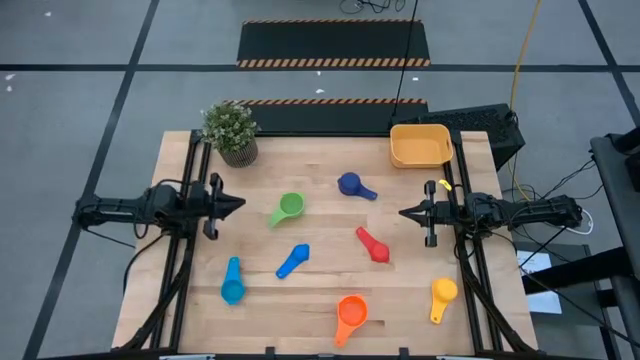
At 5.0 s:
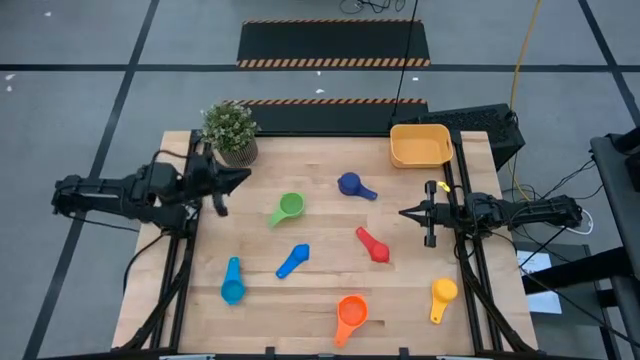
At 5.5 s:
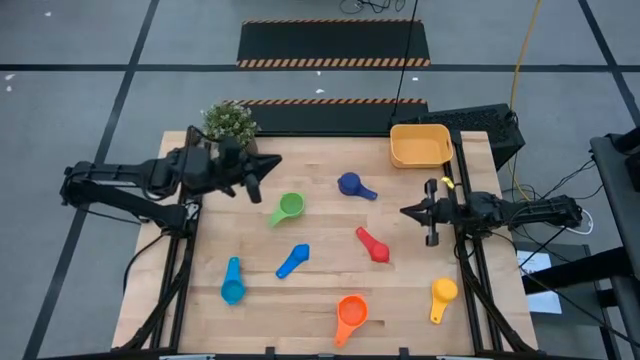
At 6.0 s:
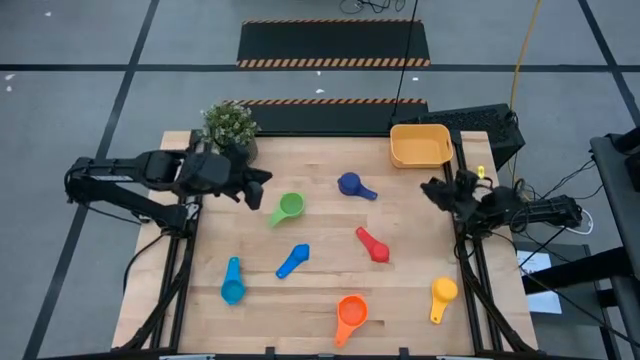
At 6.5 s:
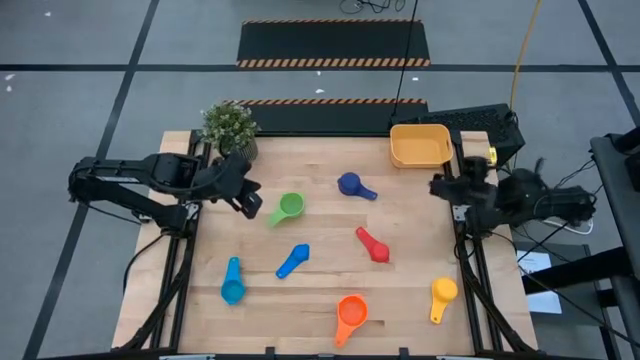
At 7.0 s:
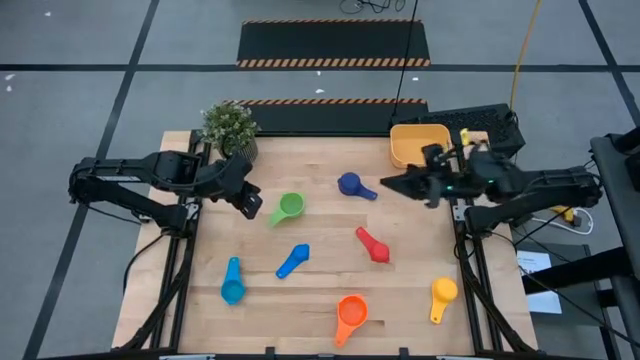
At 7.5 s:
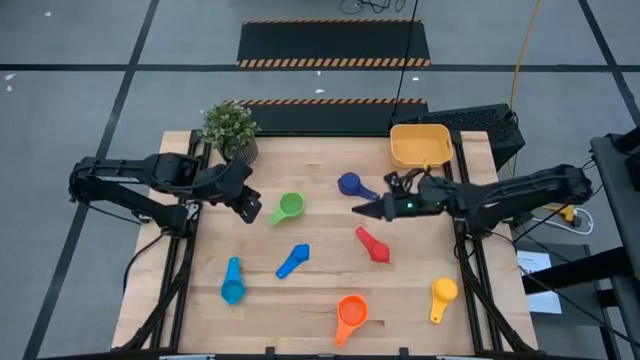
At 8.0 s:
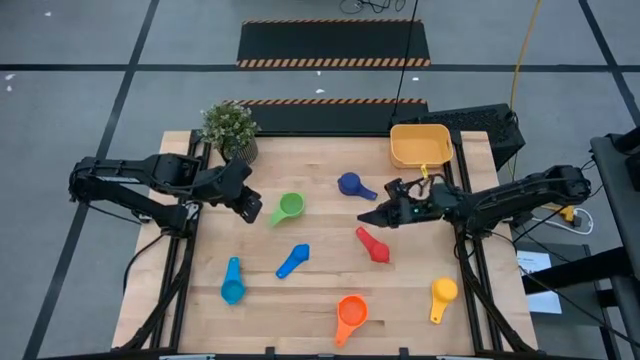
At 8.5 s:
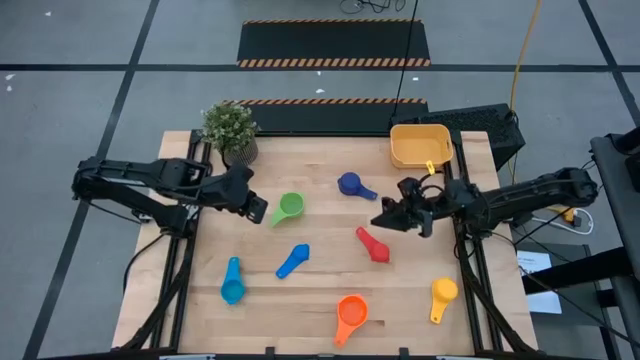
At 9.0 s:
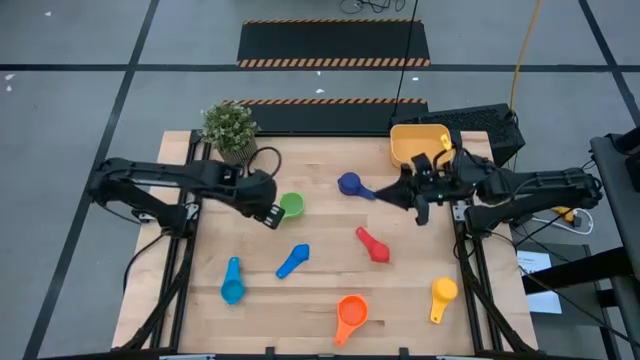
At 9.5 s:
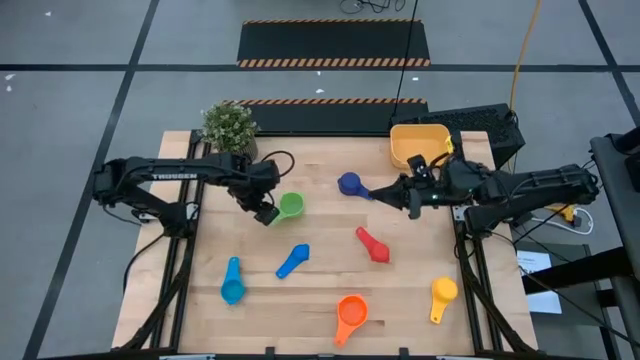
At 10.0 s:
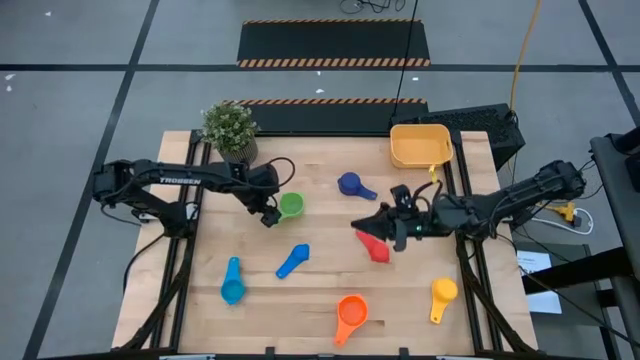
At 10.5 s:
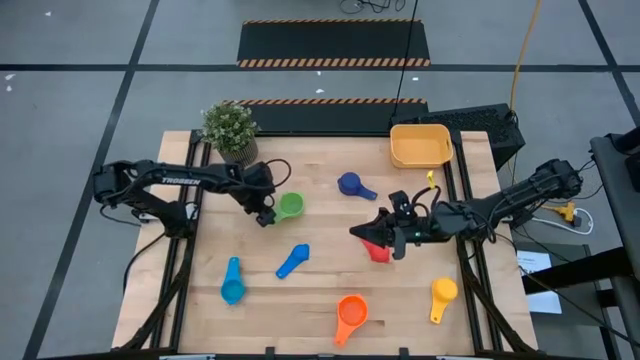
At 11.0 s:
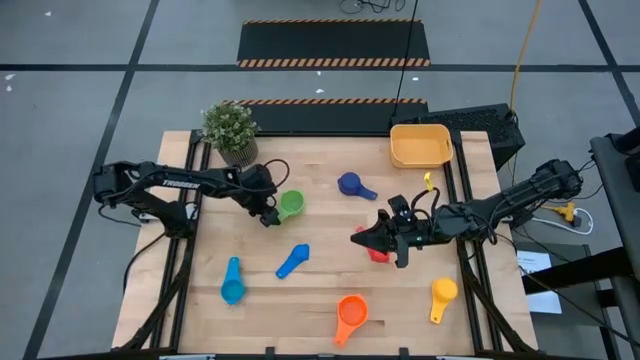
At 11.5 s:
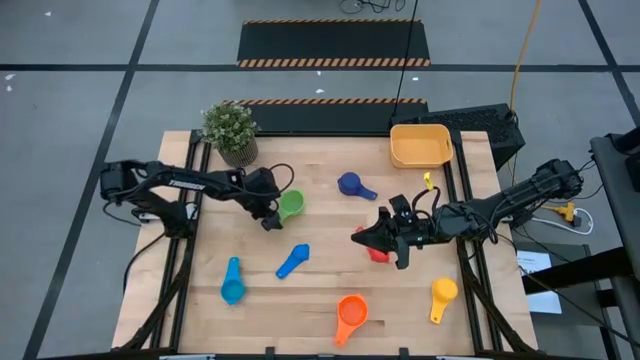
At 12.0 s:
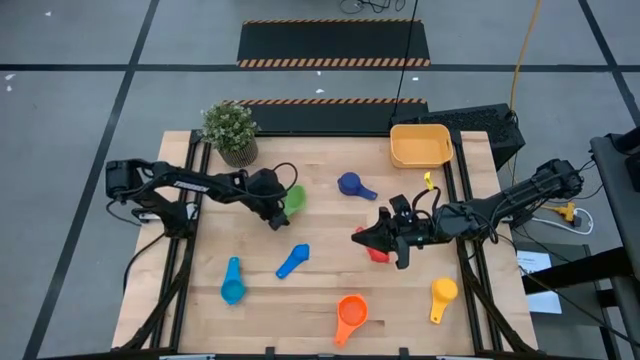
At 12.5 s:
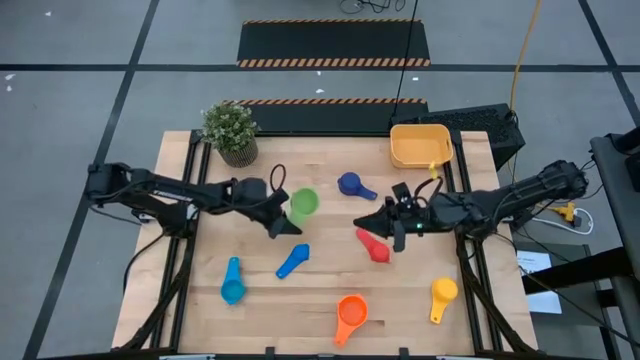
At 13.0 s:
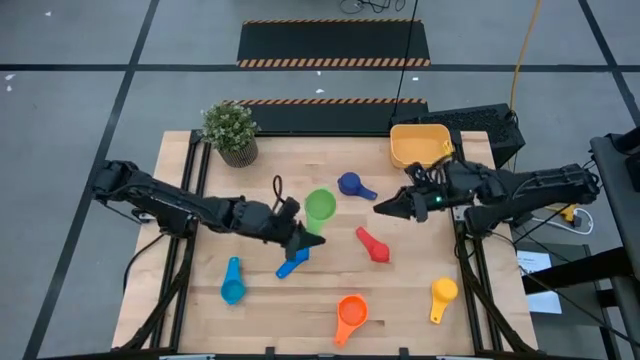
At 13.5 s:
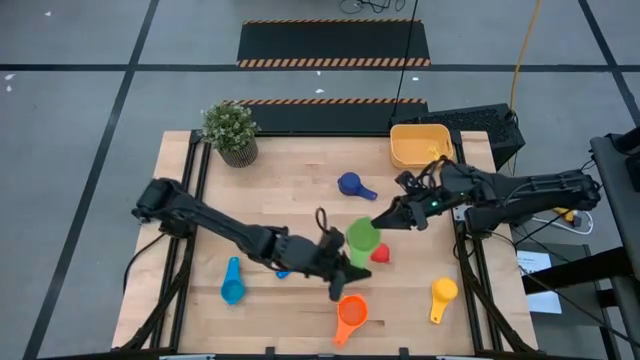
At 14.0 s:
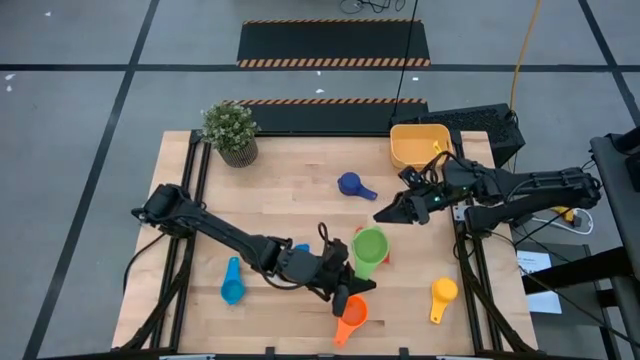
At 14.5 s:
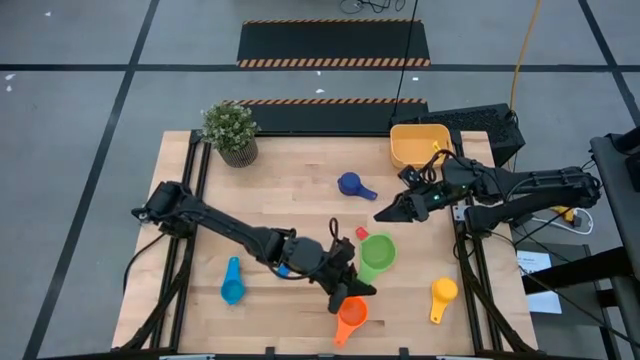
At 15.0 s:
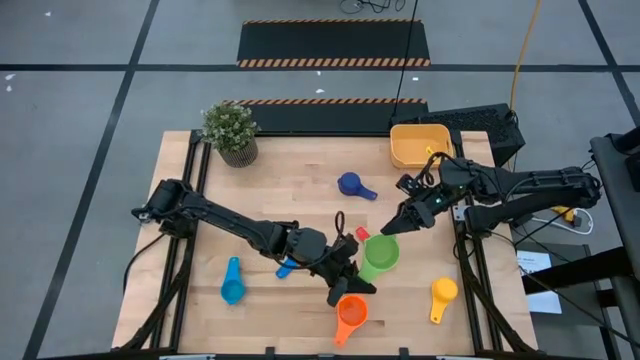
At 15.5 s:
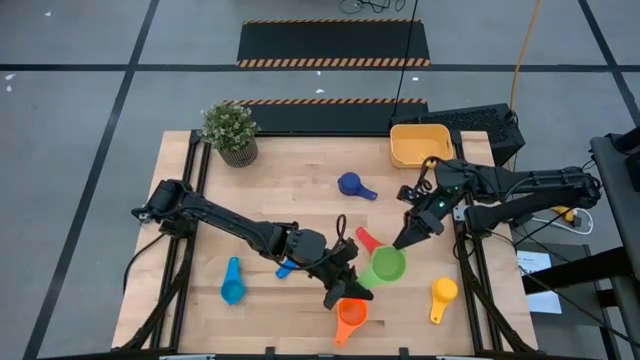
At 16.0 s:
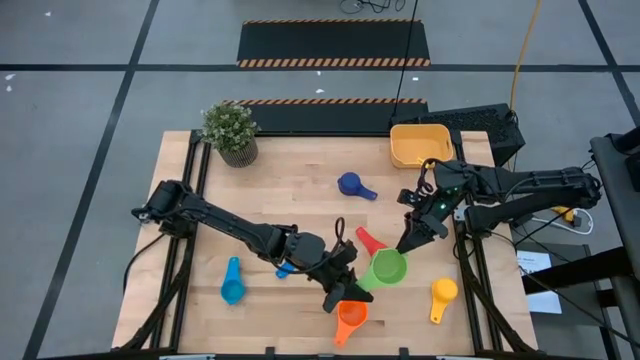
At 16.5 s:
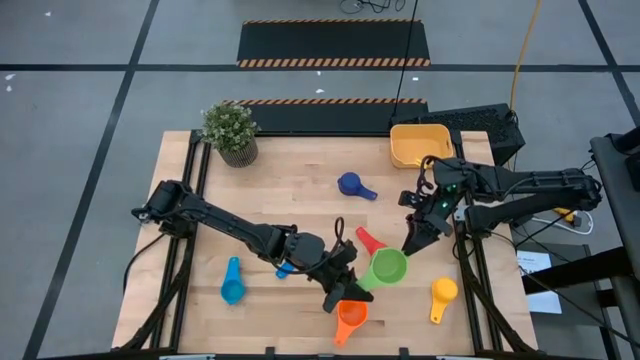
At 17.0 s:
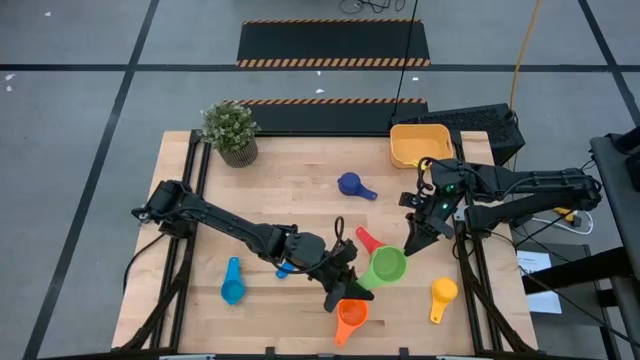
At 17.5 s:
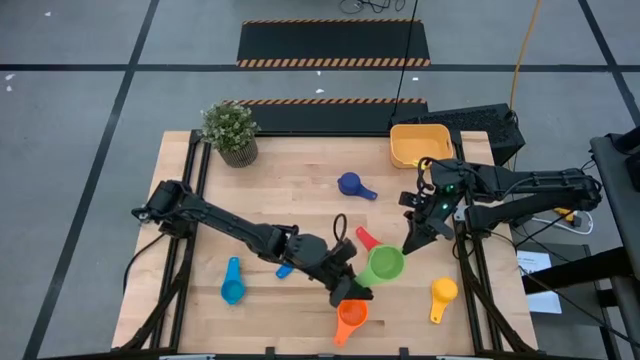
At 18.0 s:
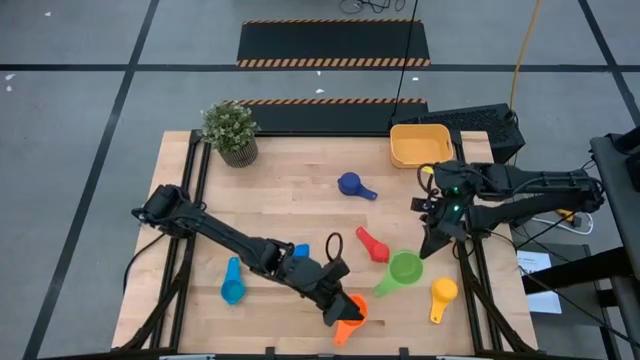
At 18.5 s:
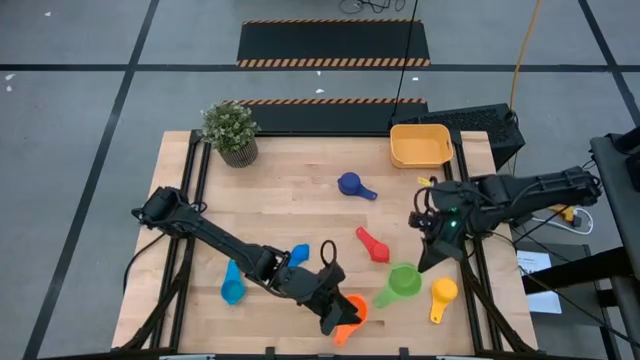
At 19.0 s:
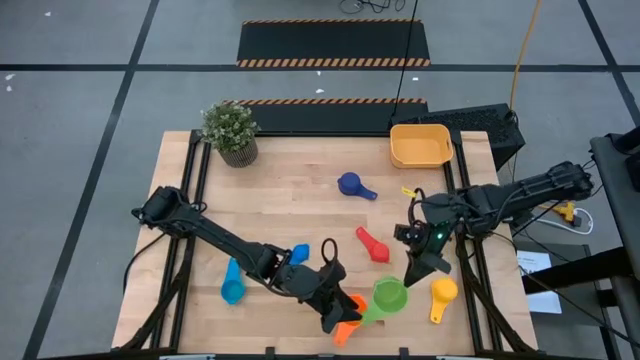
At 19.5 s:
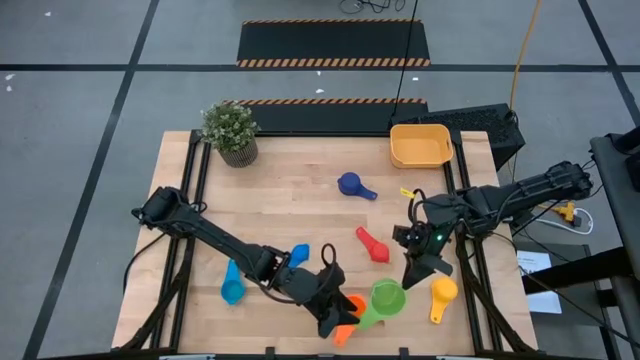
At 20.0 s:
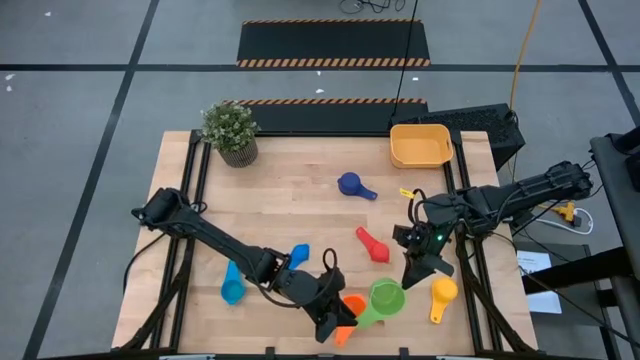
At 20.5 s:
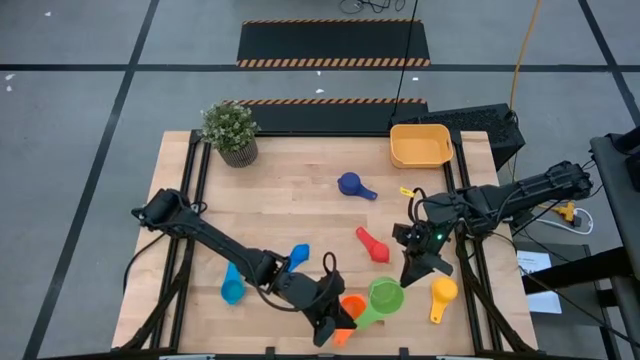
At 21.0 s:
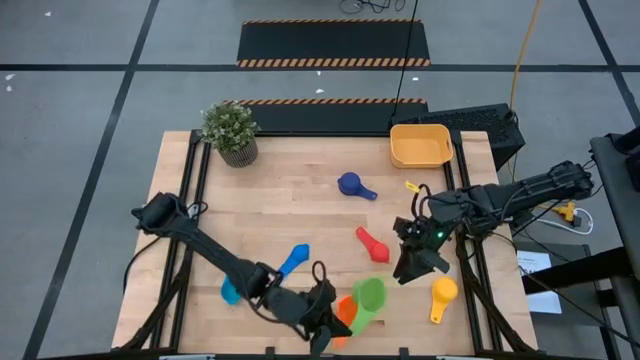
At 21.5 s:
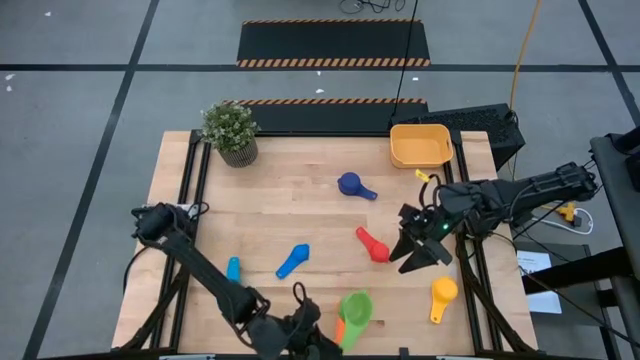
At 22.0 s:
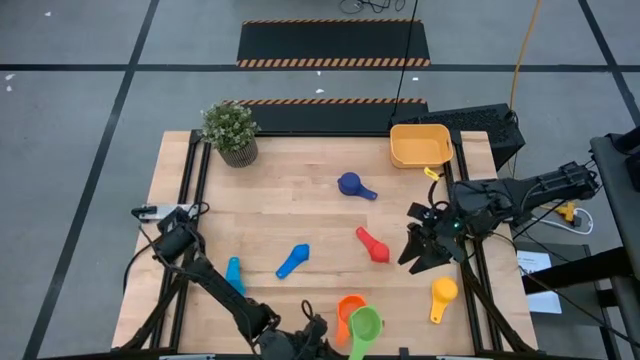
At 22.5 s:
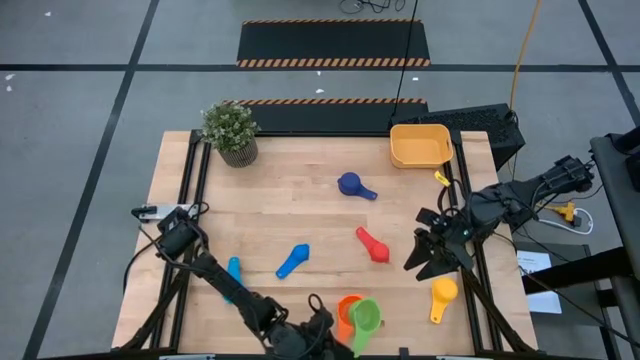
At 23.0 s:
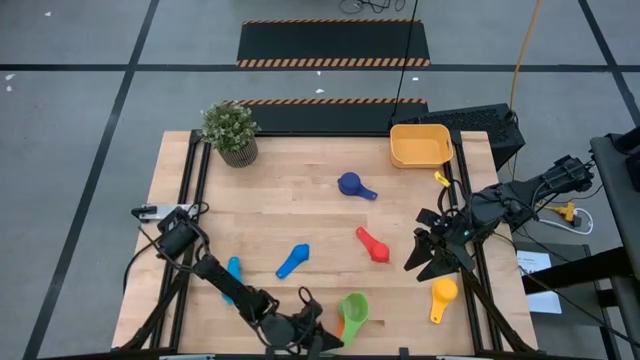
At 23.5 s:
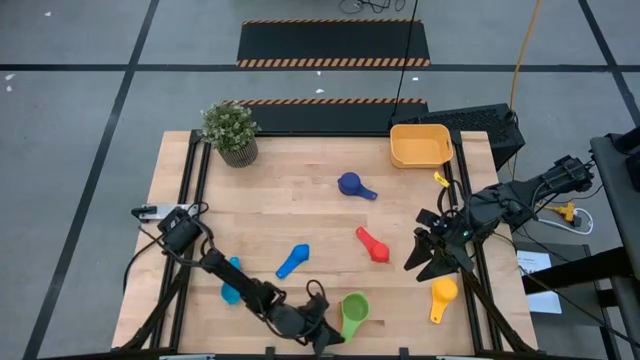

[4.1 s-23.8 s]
Task: Nest measuring cups in basket
Stack the green measuring cup on top of the orange measuring cup

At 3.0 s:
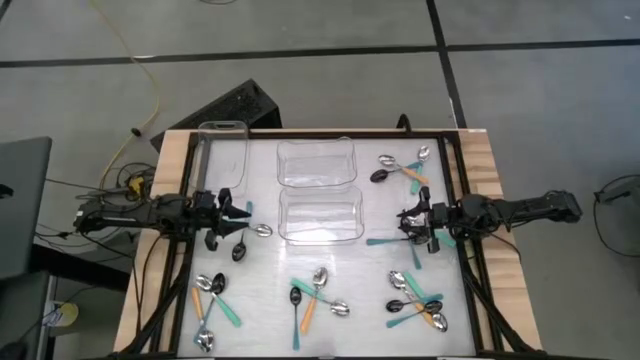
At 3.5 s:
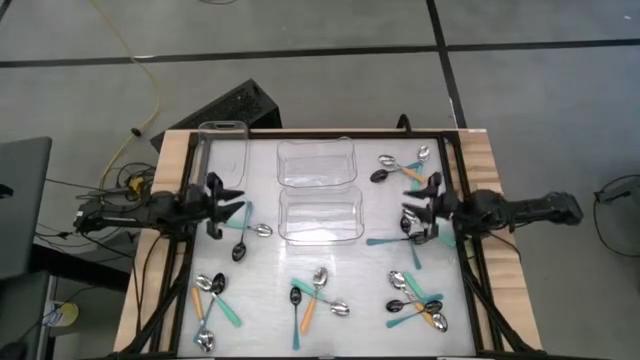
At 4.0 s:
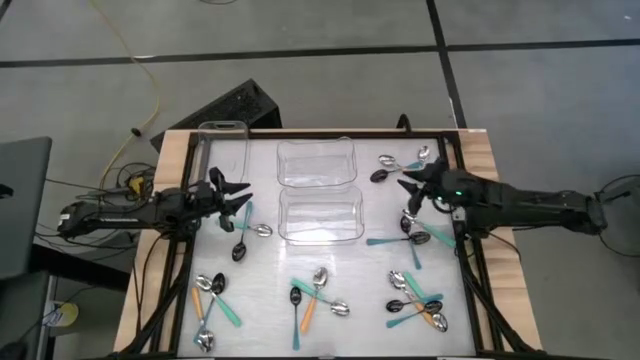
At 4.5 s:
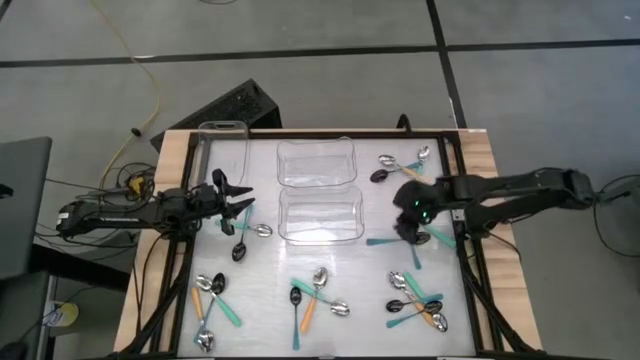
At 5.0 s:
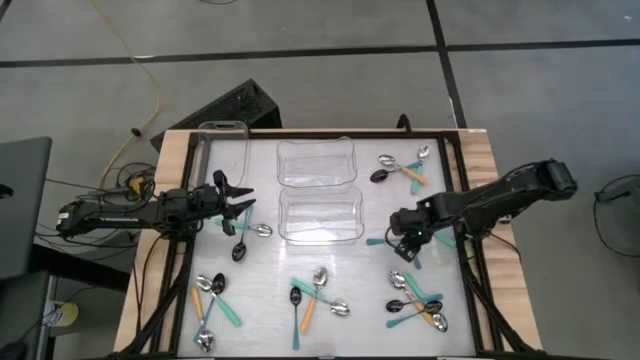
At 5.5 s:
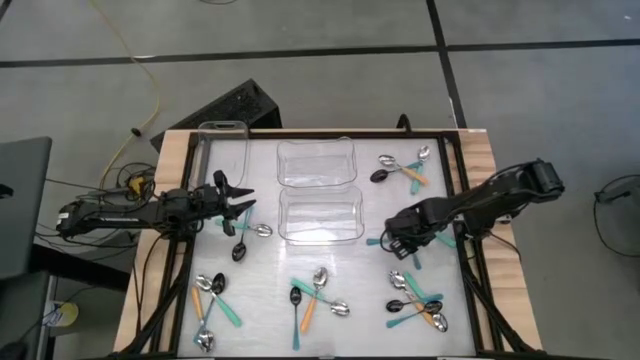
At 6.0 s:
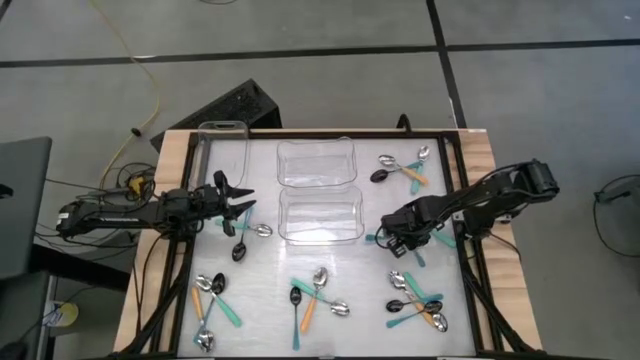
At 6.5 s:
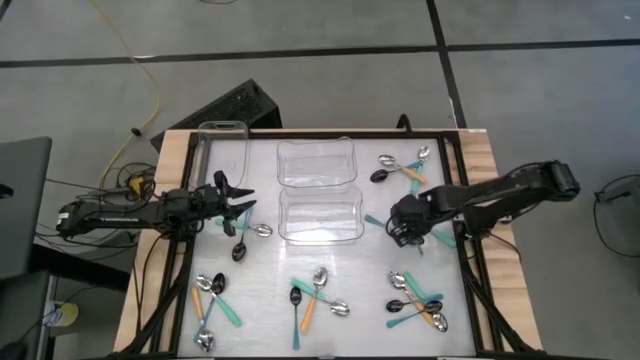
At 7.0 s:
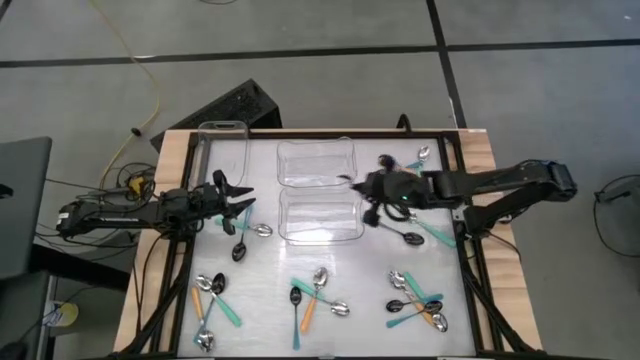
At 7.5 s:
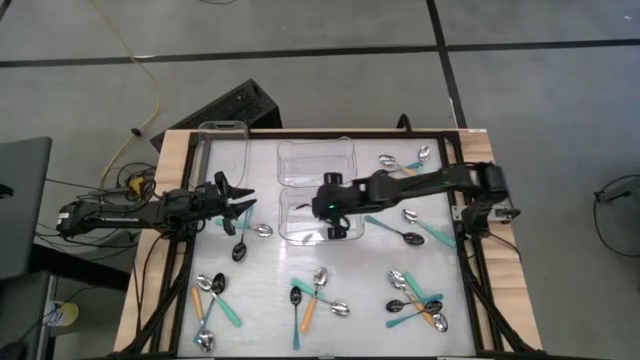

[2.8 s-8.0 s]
Task: Sort silverware by color (type)
Put the blue spoon into the bottom transparent bin
